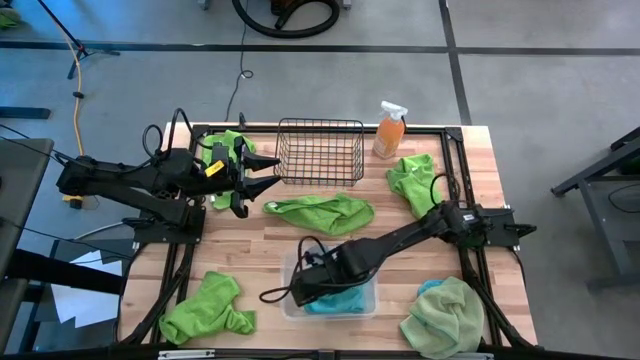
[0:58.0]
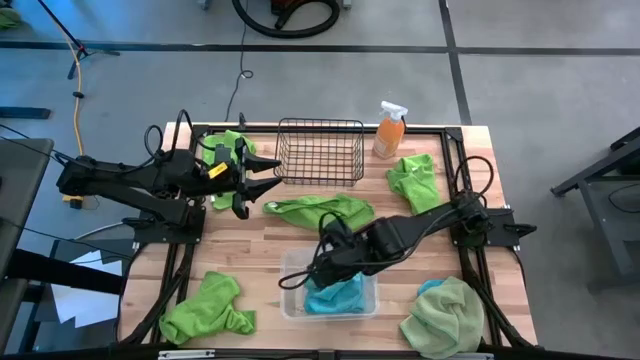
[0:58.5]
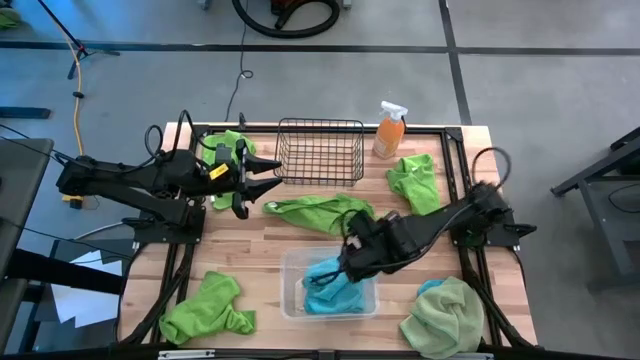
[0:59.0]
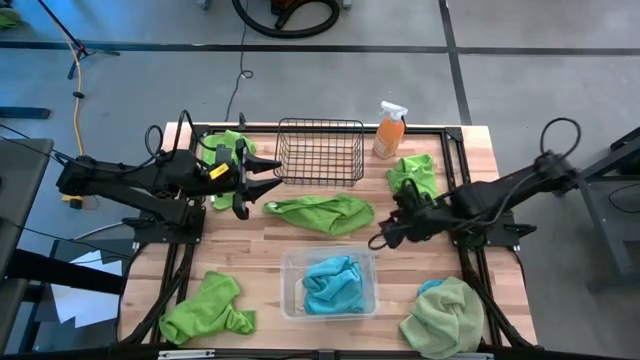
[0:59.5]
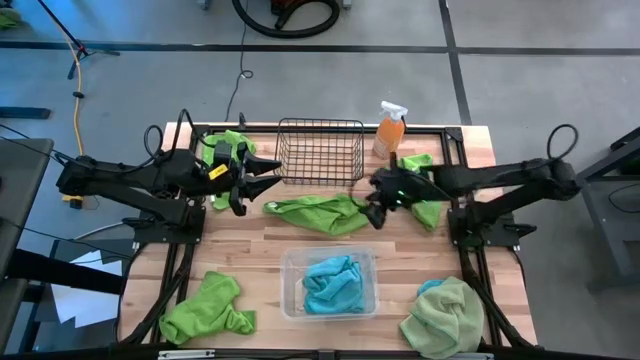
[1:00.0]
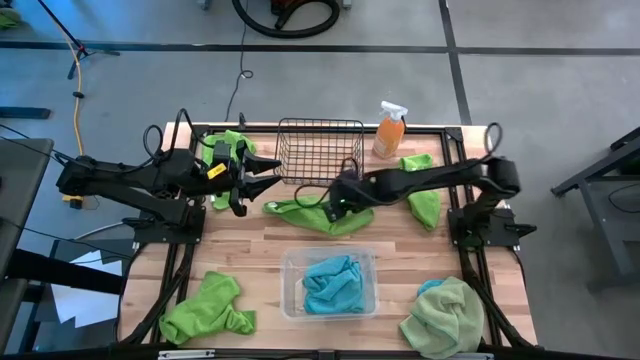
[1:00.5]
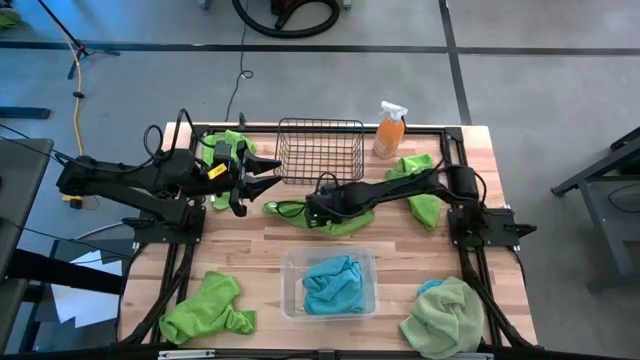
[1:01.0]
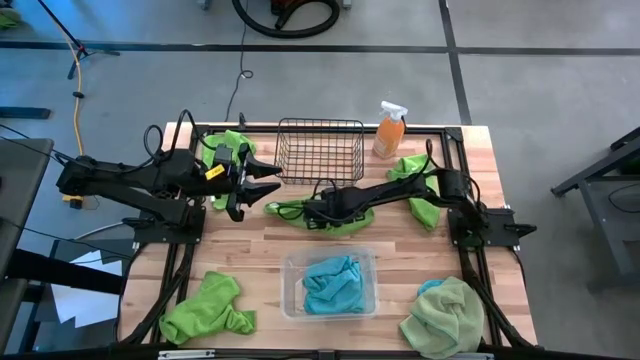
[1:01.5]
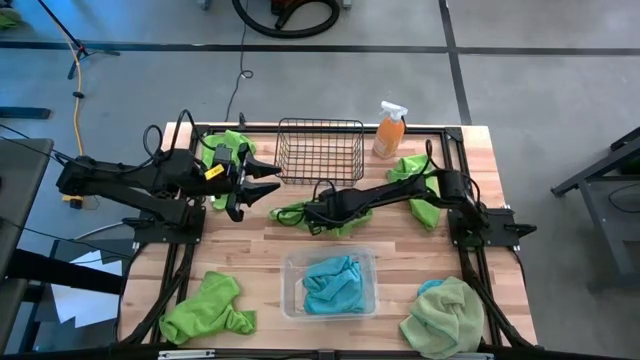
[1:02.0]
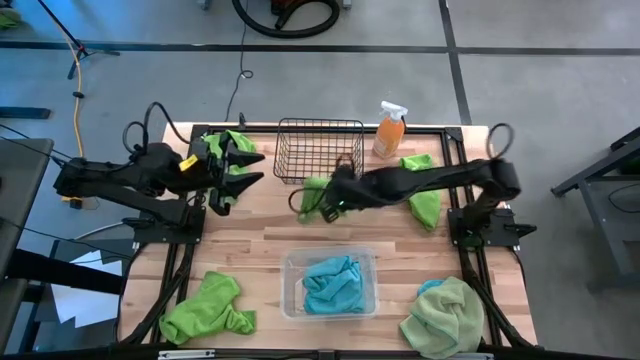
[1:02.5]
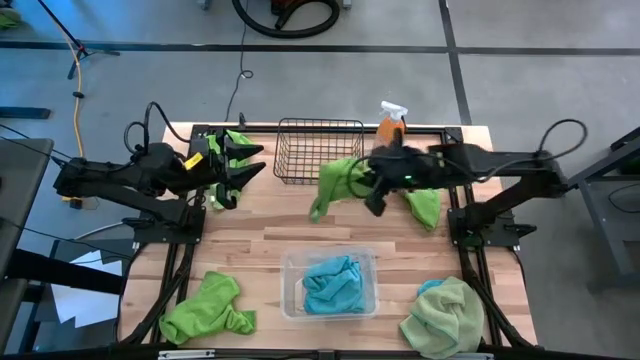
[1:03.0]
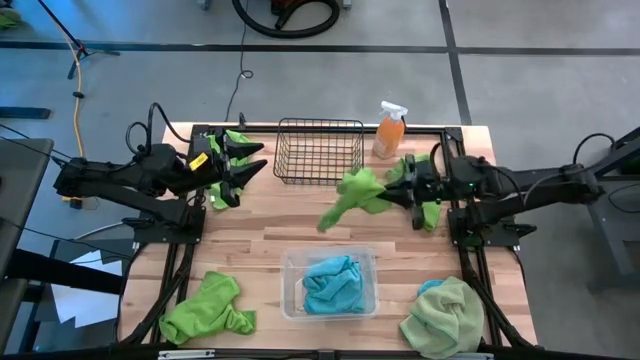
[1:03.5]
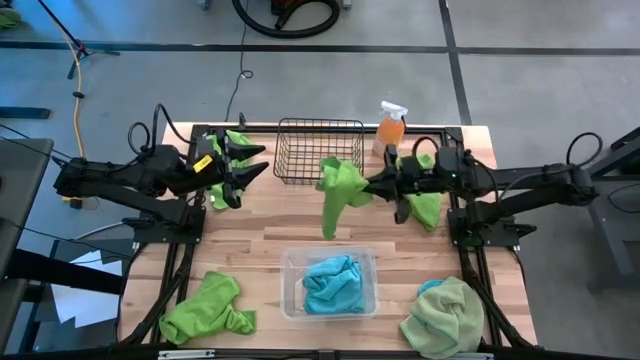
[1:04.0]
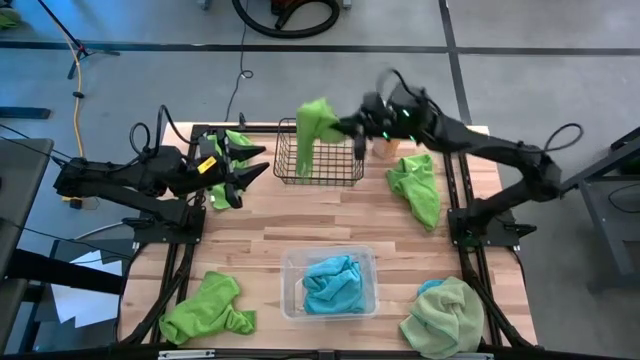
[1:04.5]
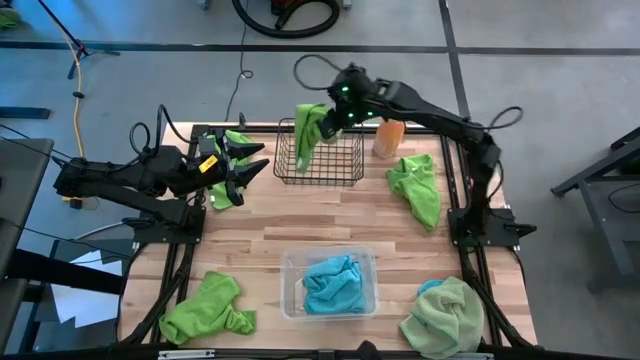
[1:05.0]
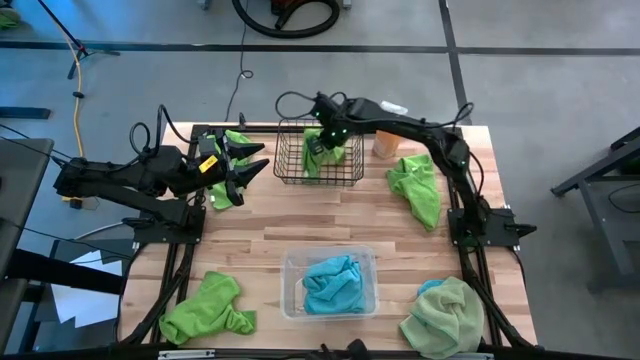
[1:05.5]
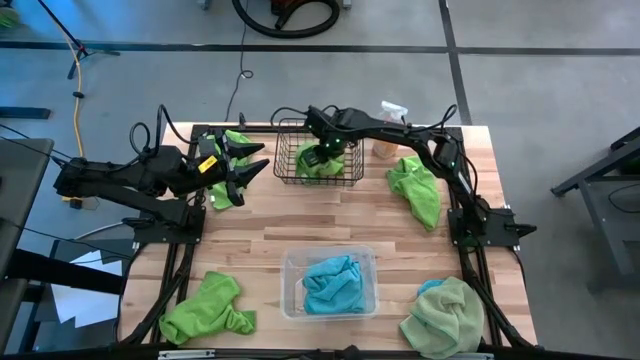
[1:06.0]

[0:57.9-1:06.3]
Task: Sort microfiber towel by color & place in baskets
Put the middle green towel into the wire basket

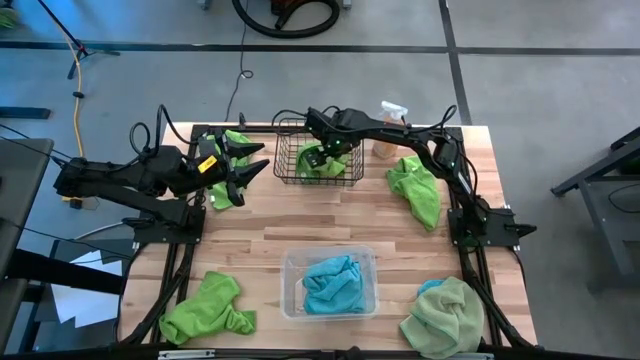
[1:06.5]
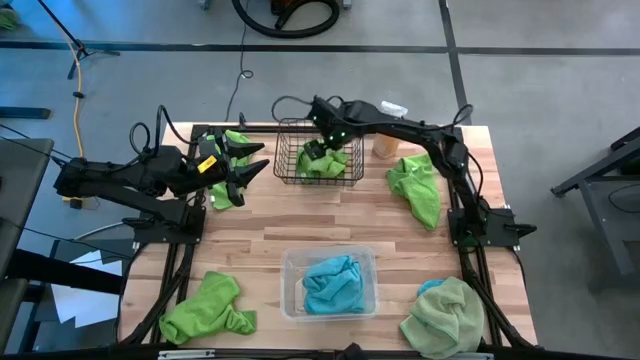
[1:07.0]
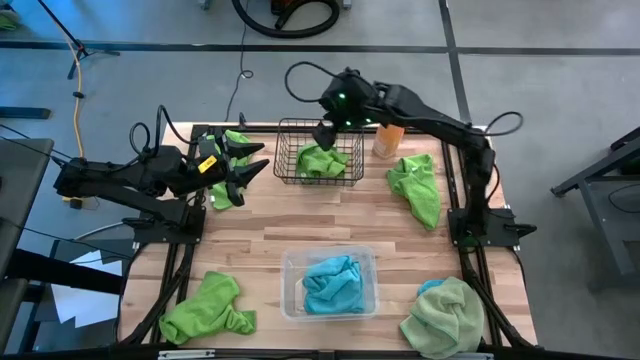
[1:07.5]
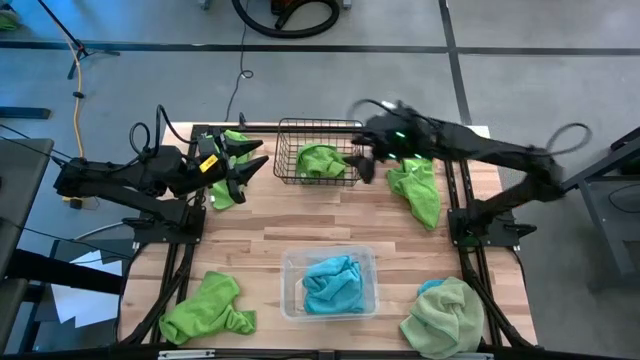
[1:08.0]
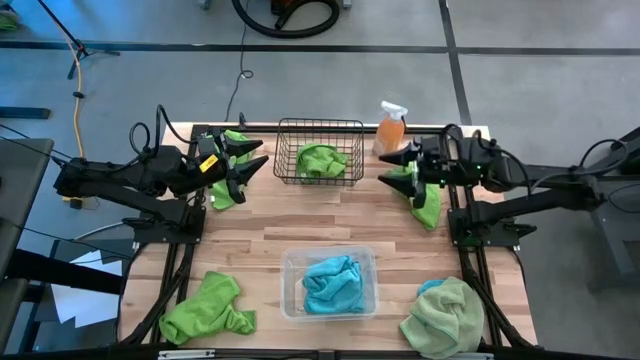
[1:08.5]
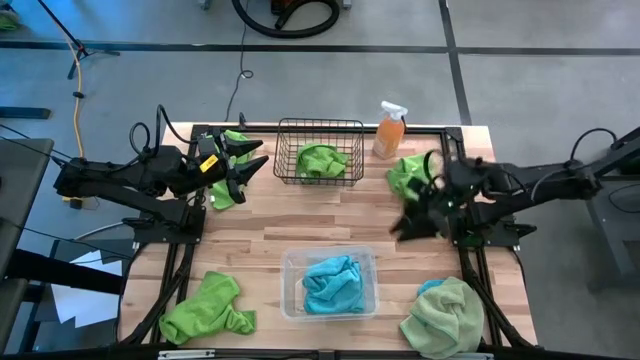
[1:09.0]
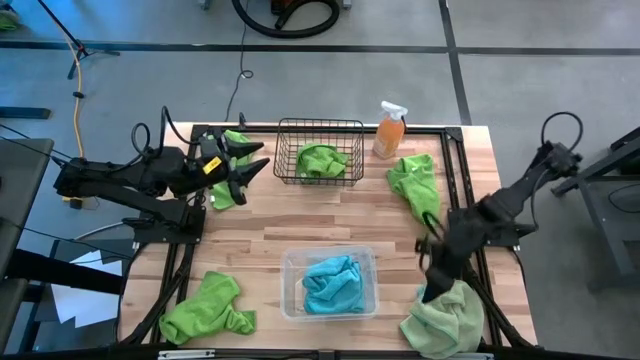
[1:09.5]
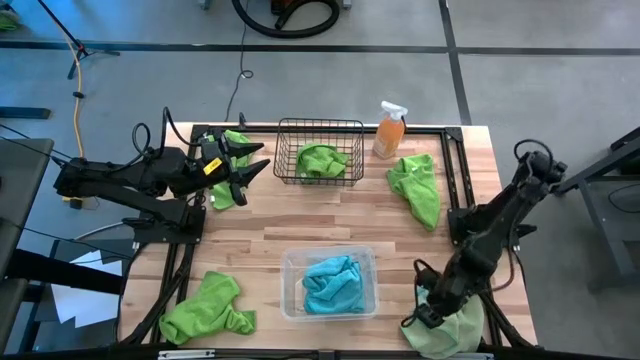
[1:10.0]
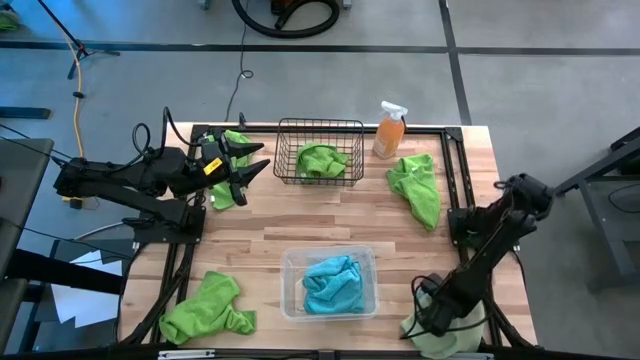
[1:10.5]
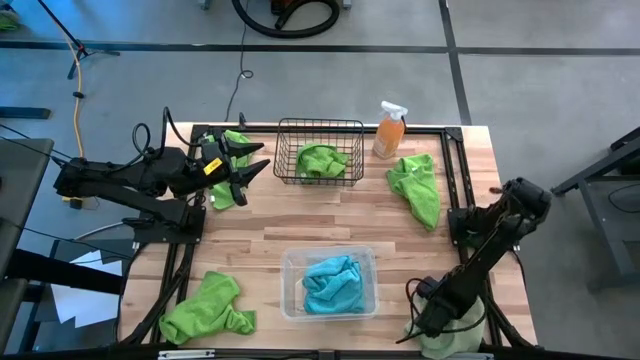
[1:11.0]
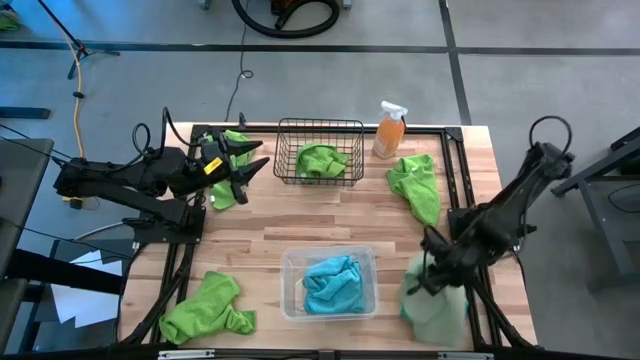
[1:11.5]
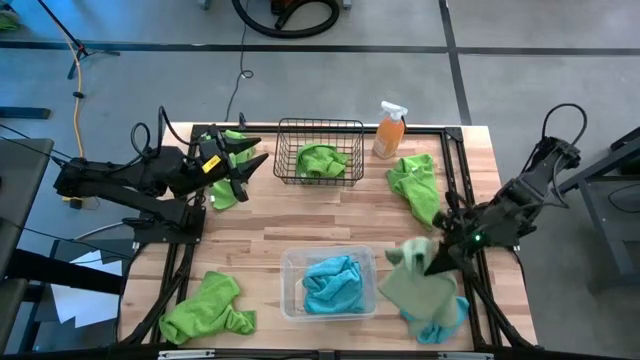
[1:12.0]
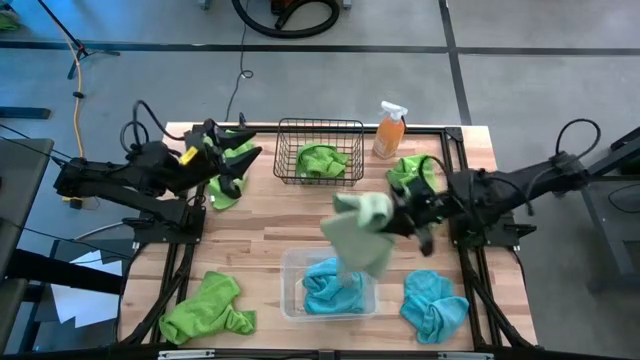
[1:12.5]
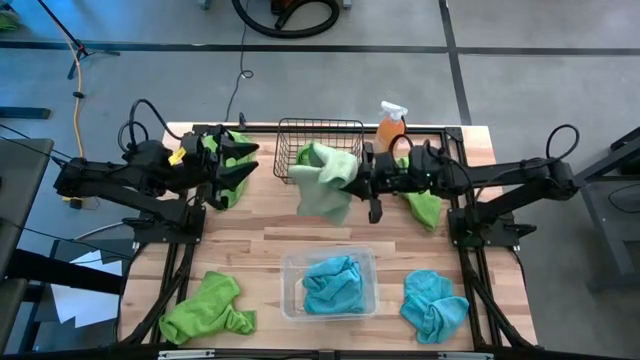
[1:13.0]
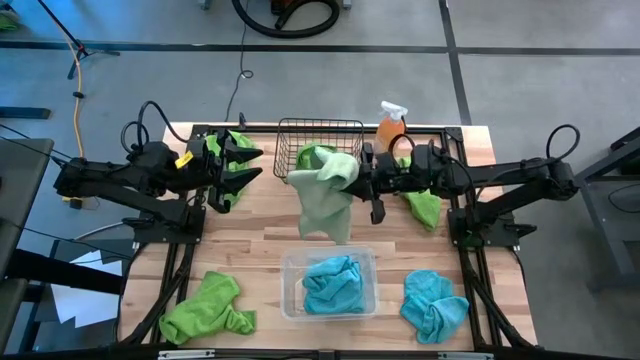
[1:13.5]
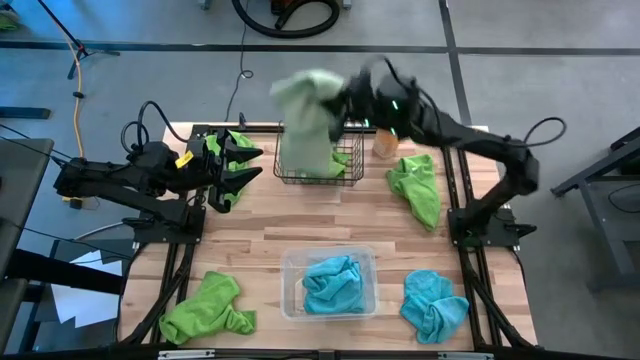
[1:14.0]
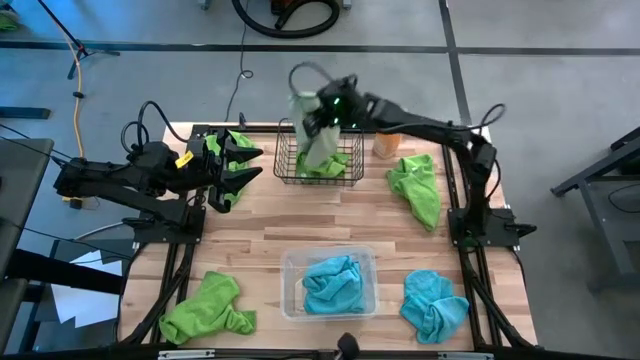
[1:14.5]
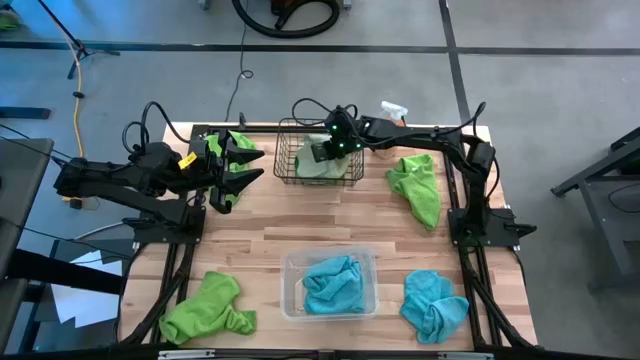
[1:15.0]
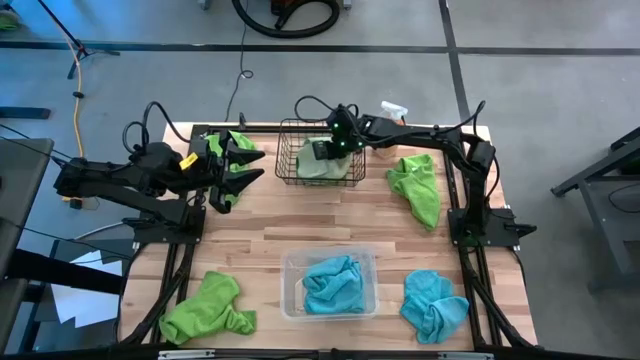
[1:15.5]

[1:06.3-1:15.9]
Put the light green towel into the wire basket

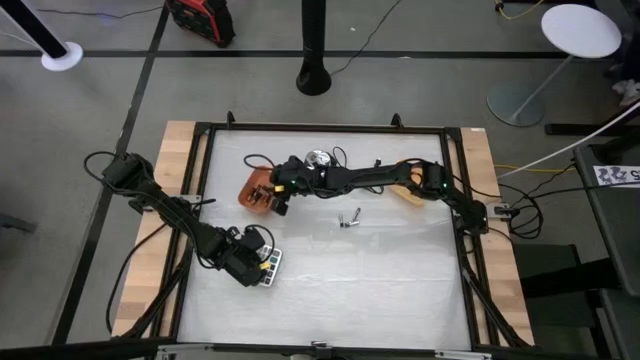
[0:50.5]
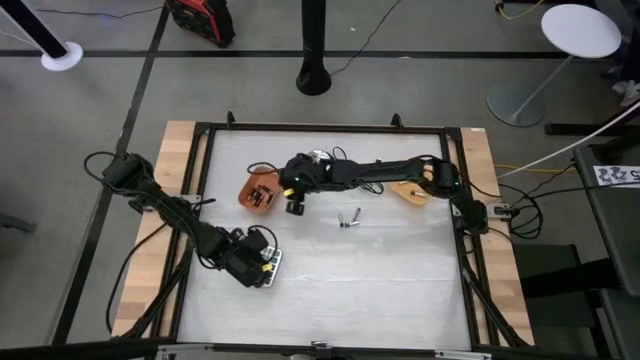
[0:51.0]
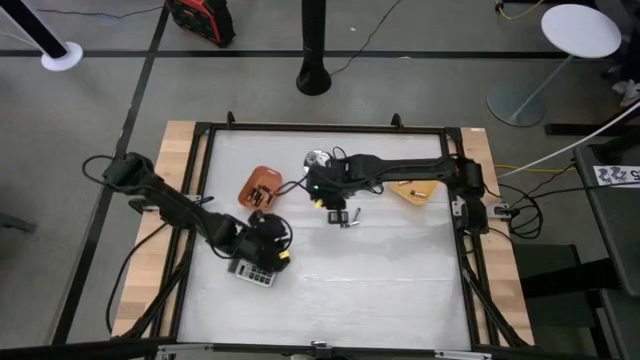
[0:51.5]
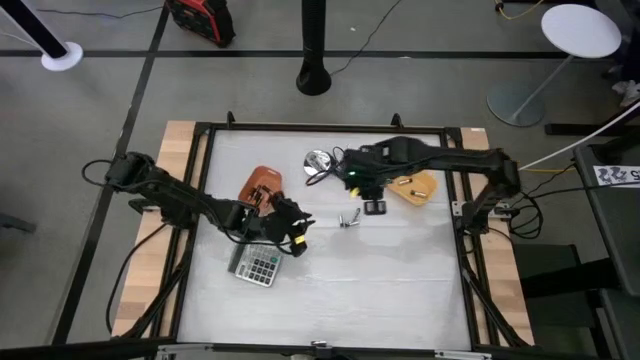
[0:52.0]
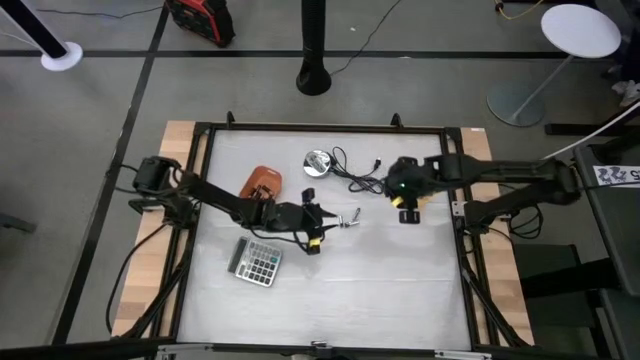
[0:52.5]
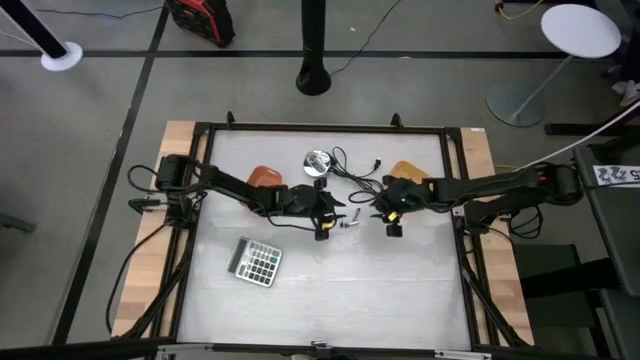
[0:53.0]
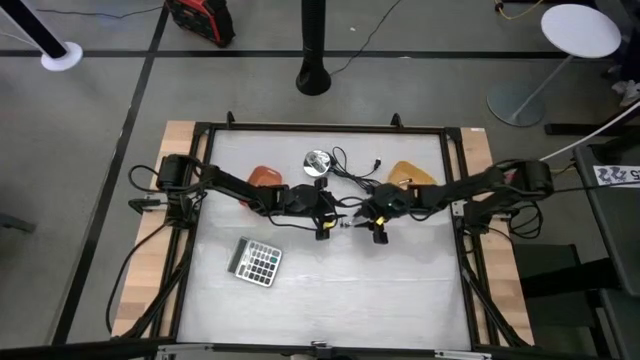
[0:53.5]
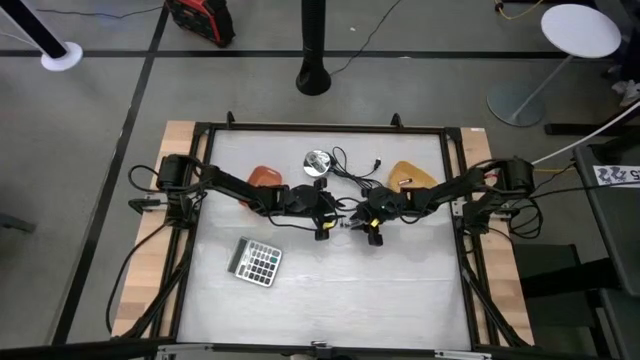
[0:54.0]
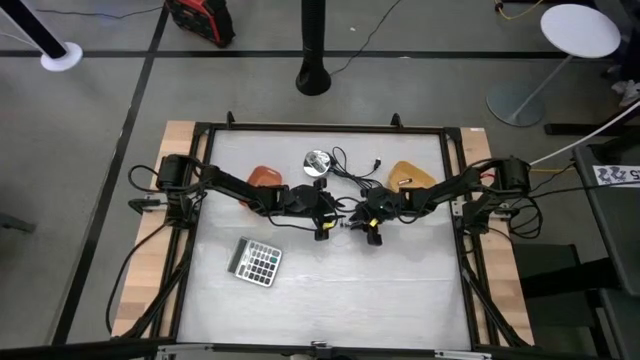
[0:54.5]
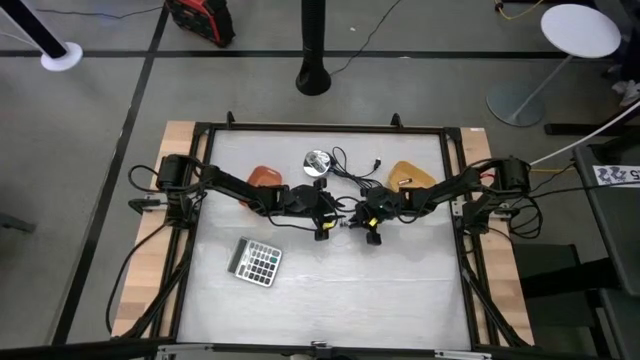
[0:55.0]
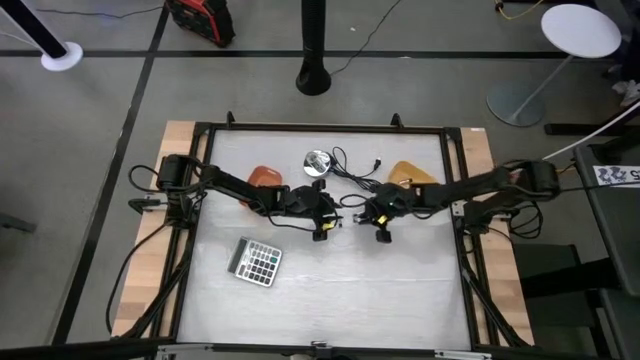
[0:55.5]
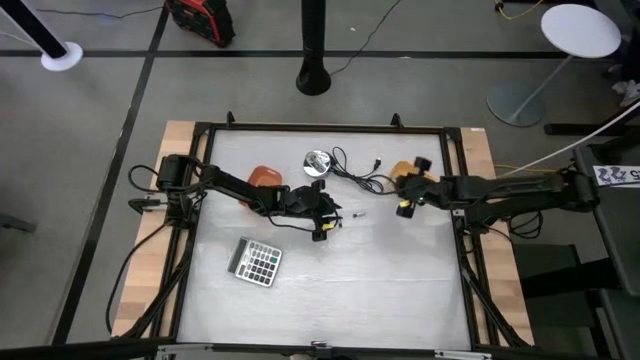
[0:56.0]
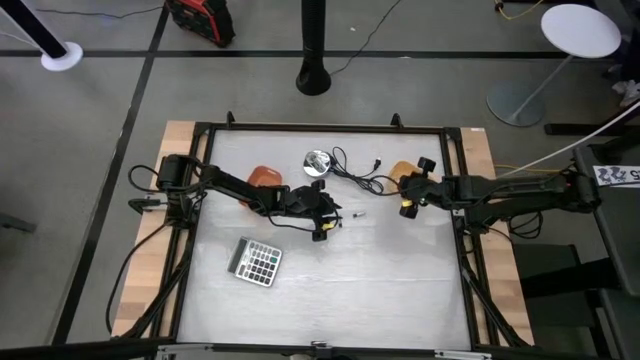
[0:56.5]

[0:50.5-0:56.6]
Task: Sort batteries
Put the silver battery into the yellow bin
